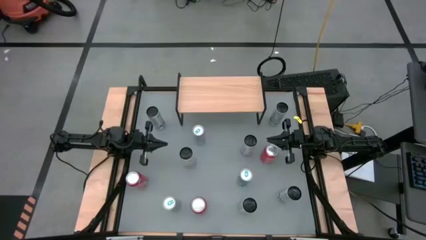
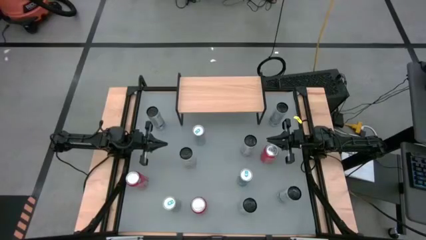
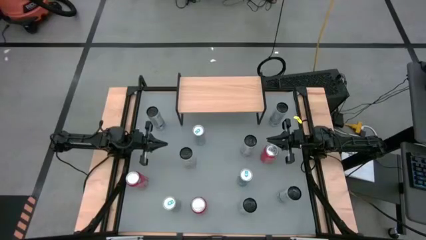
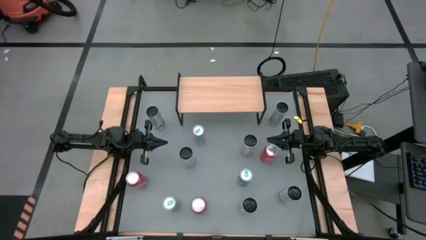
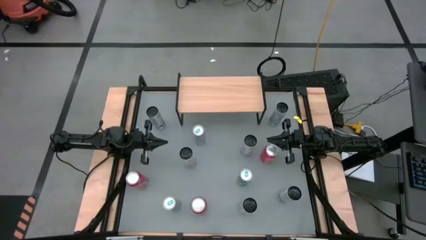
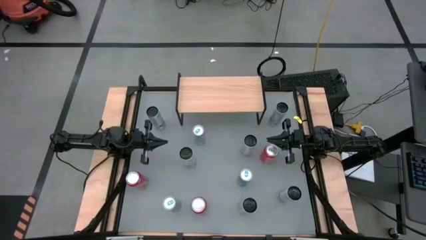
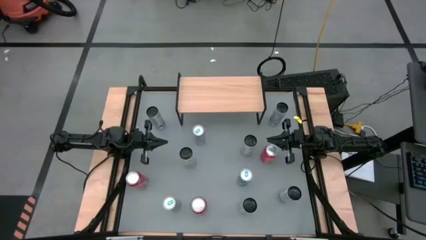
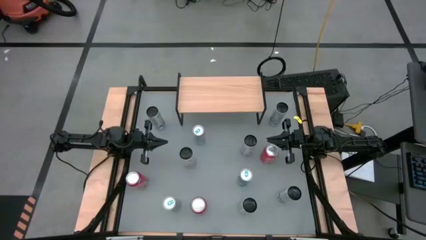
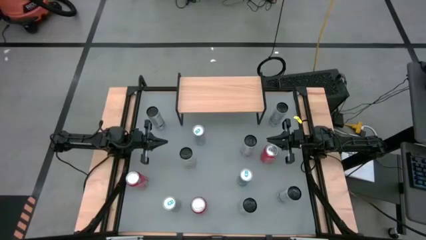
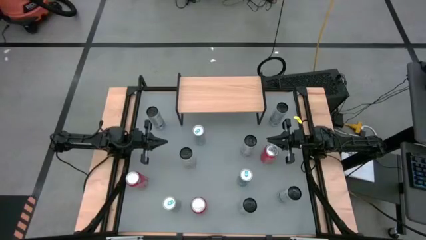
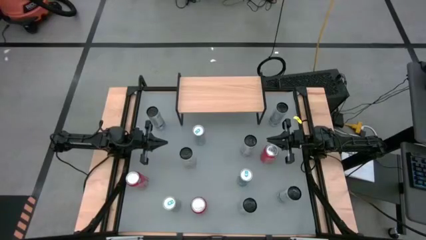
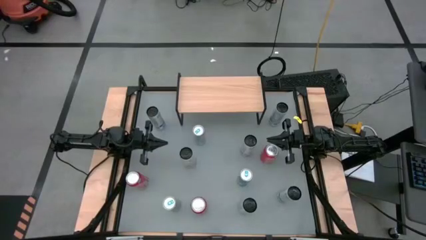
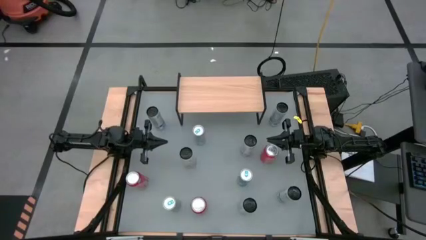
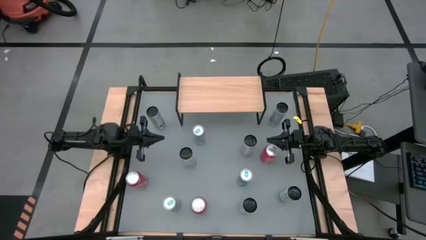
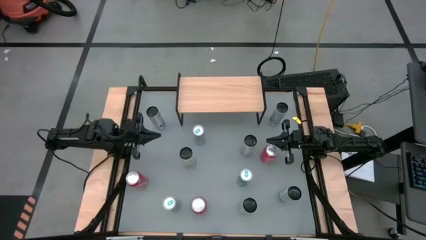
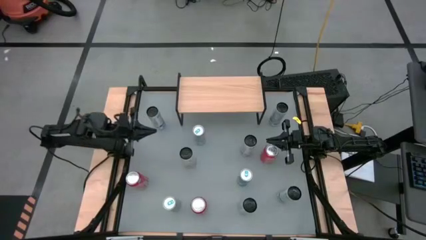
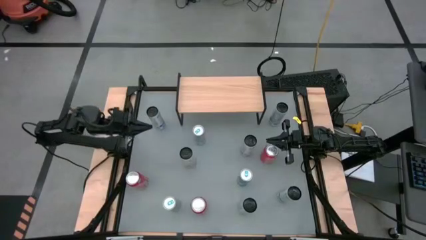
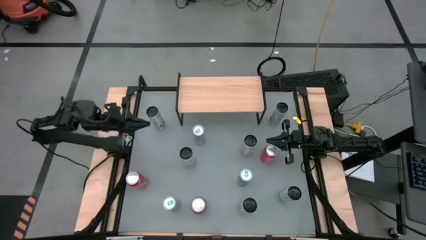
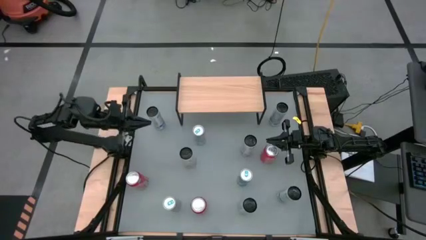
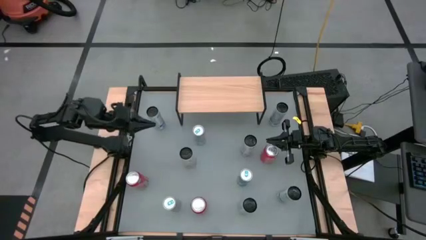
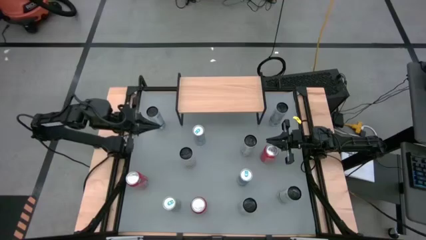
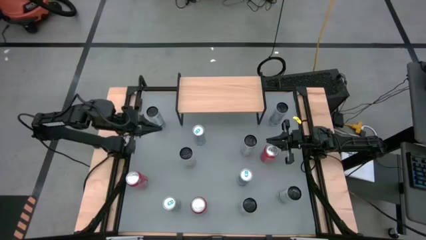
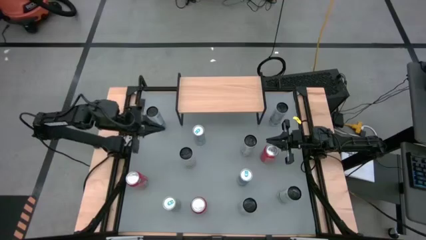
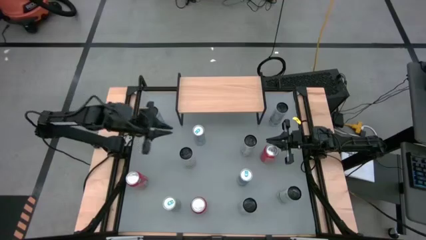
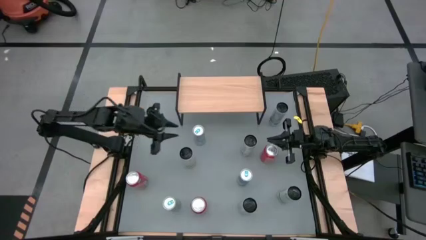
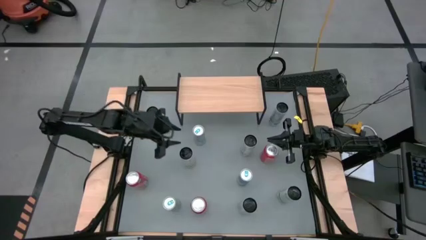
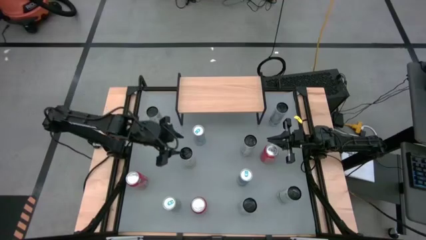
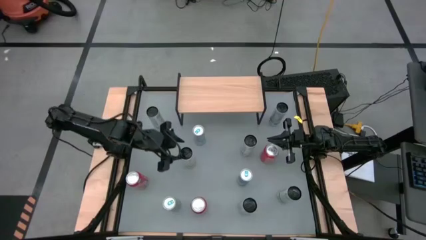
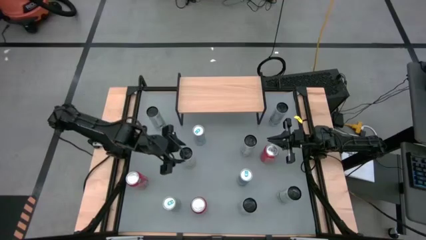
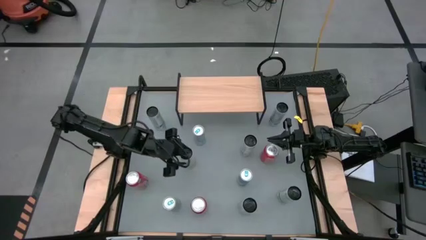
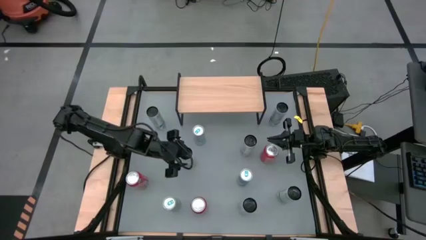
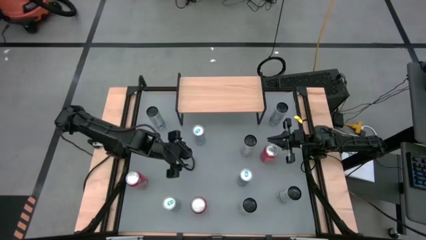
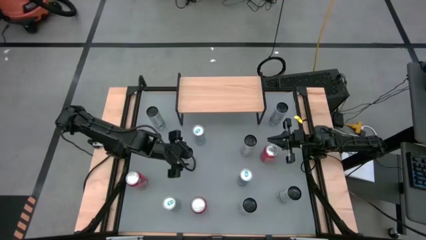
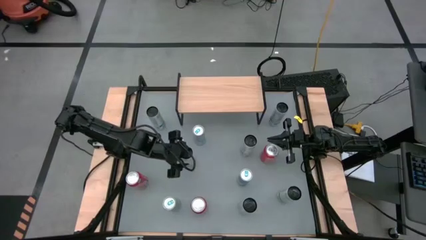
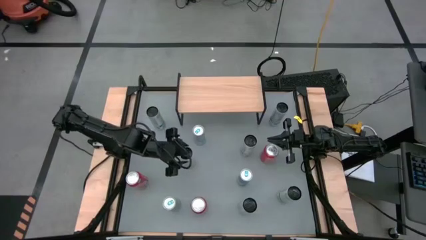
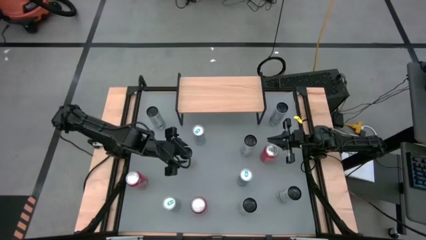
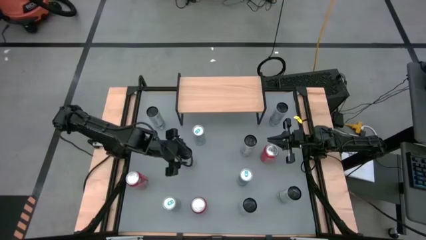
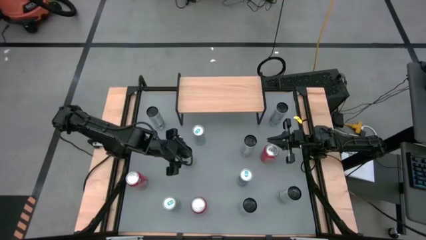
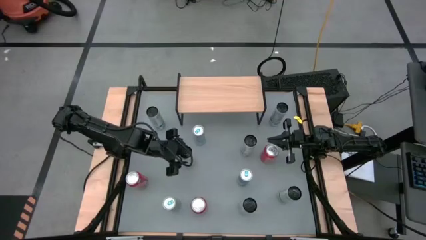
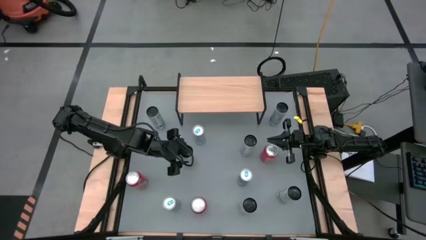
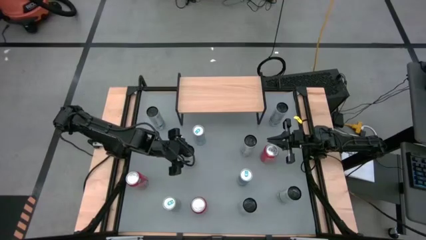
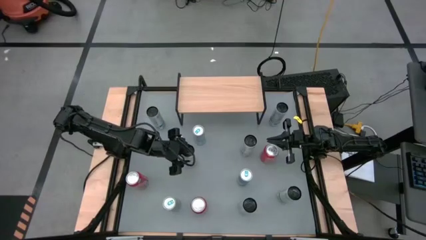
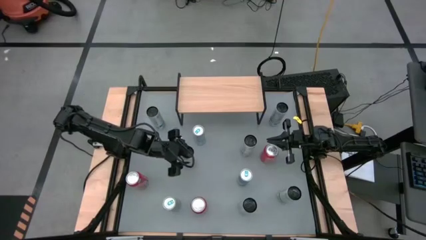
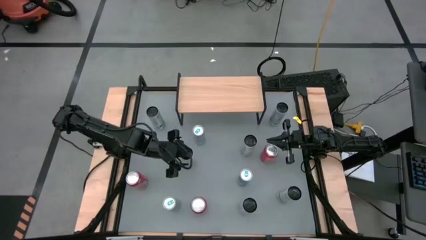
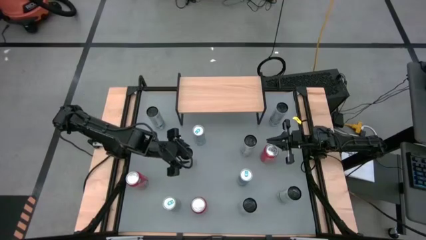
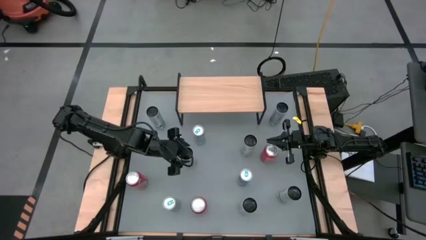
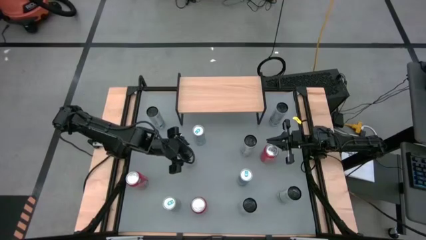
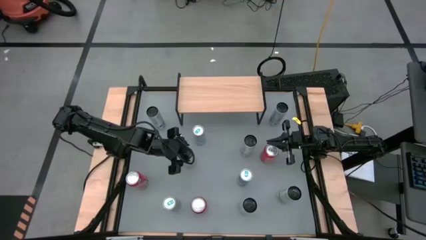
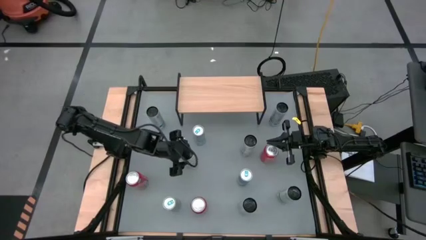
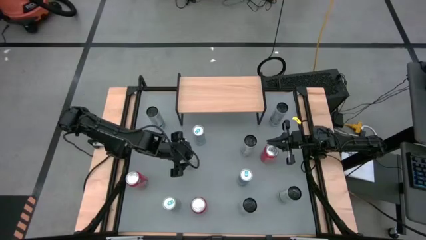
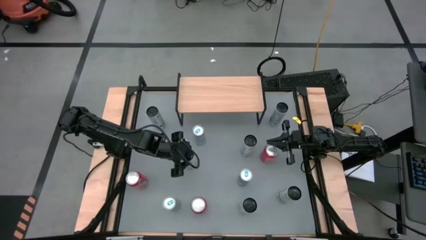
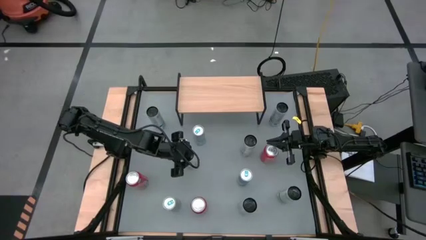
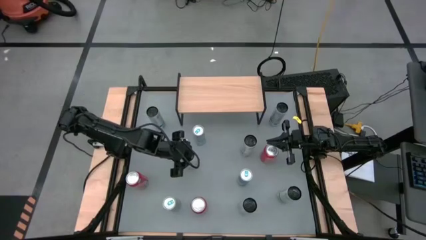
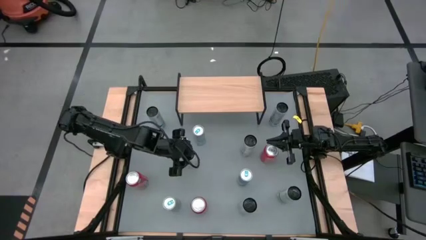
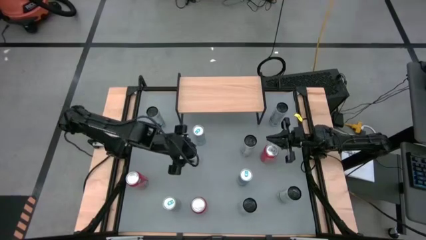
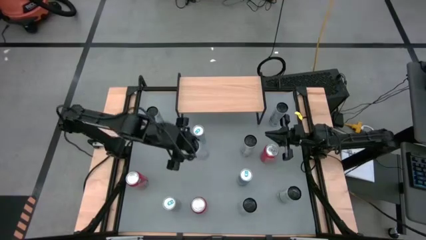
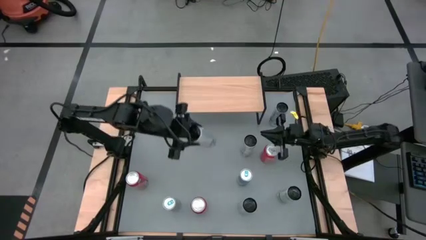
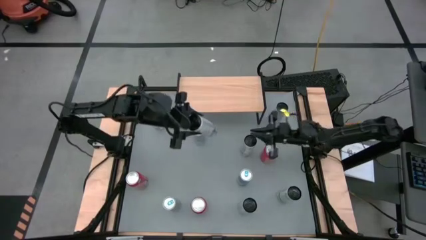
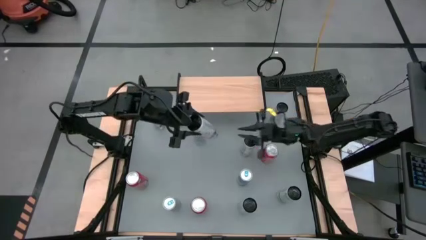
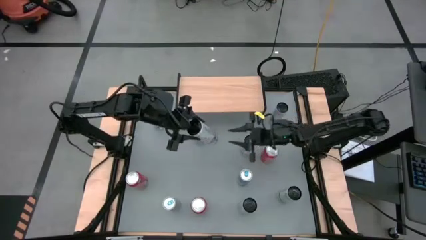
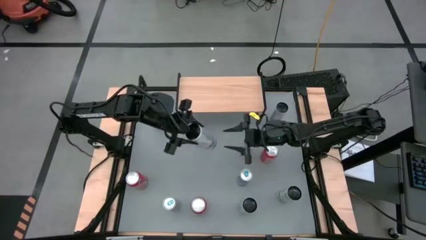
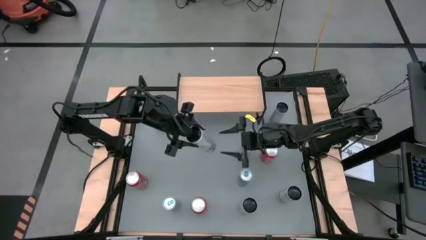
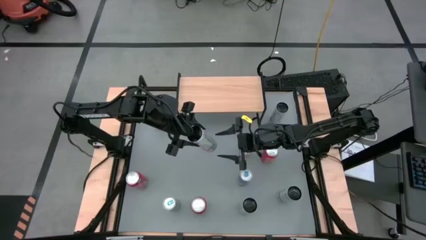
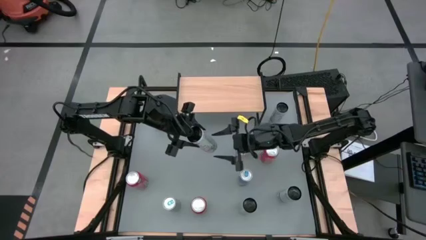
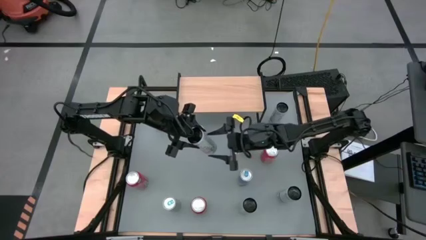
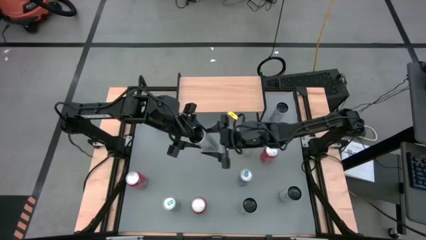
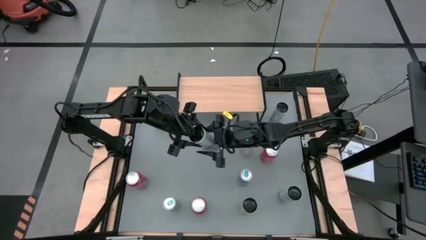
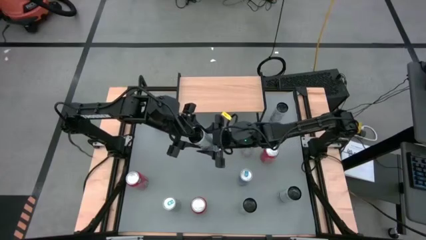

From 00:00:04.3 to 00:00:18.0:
Task: Place canned beverage on shelf
Put the left yellow soda can on the shelf
